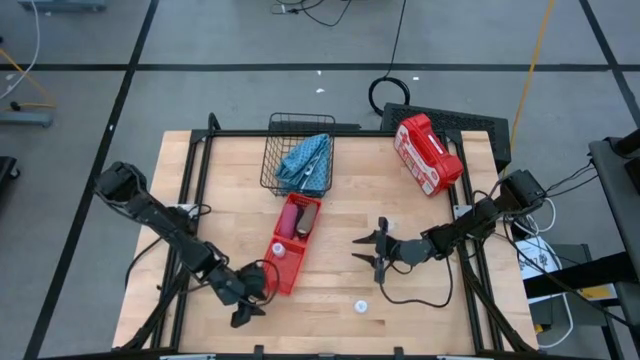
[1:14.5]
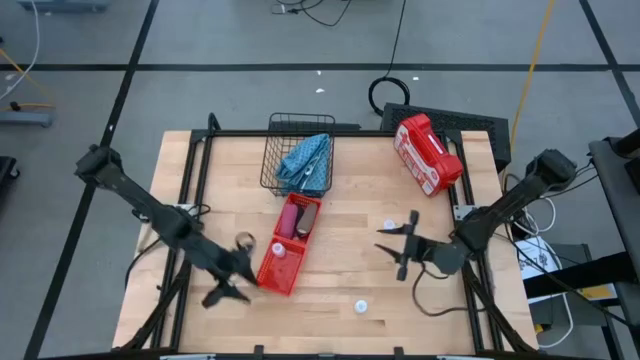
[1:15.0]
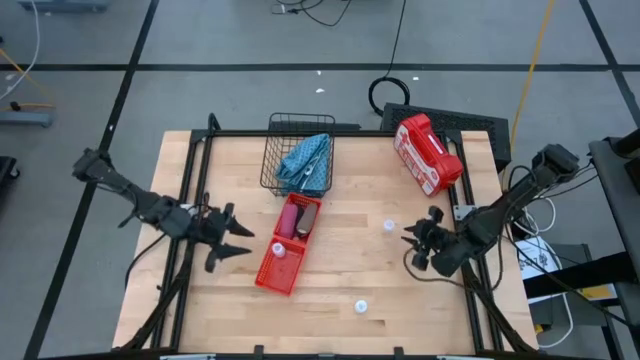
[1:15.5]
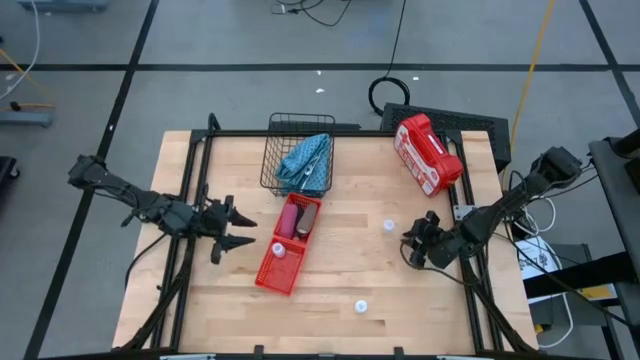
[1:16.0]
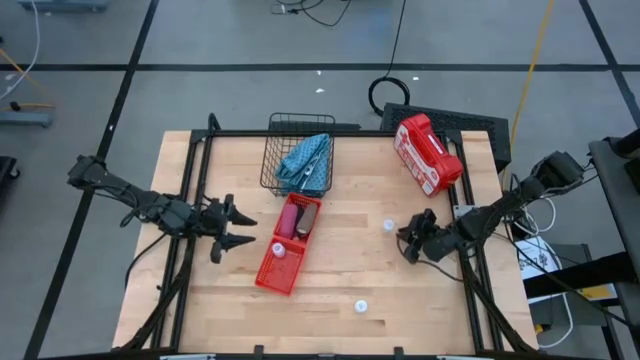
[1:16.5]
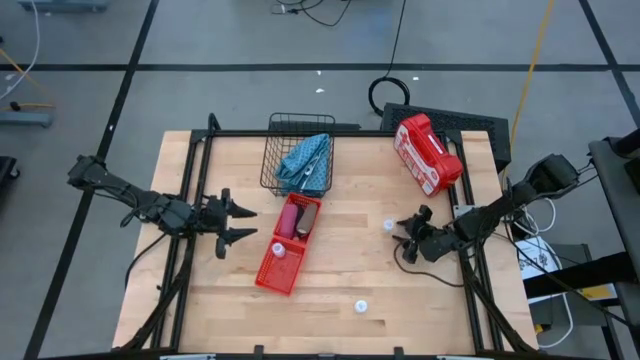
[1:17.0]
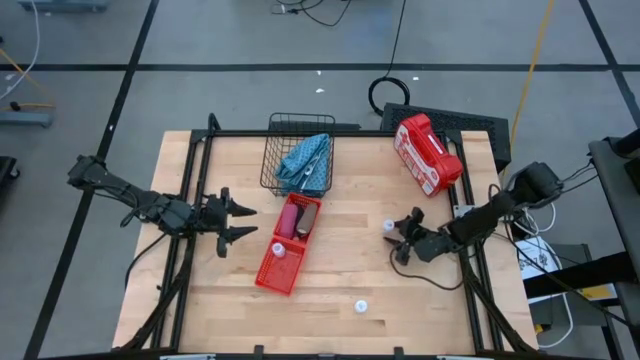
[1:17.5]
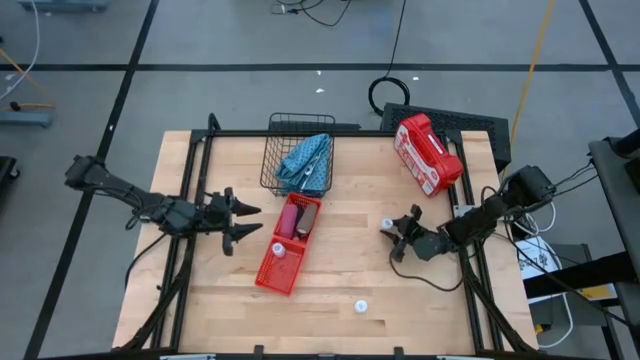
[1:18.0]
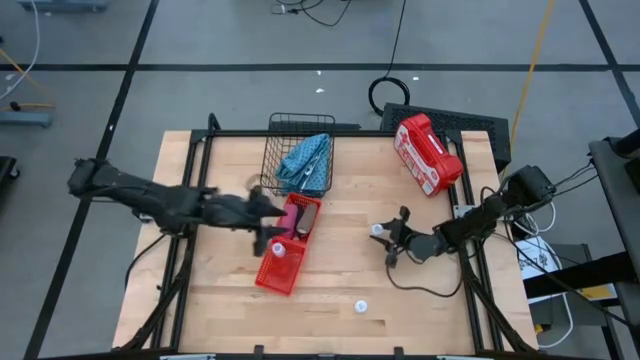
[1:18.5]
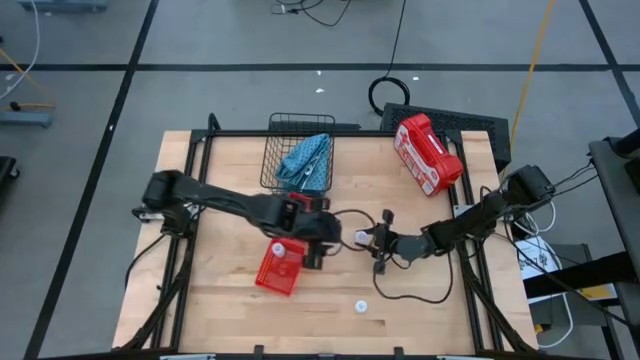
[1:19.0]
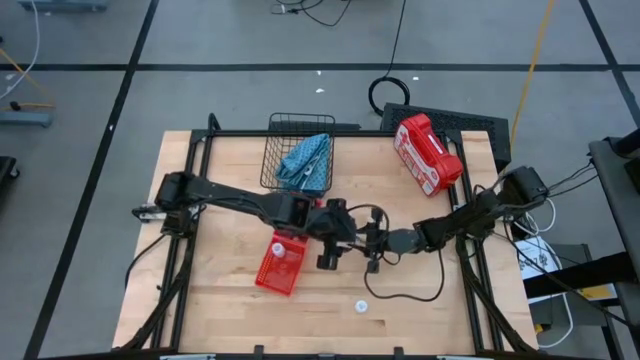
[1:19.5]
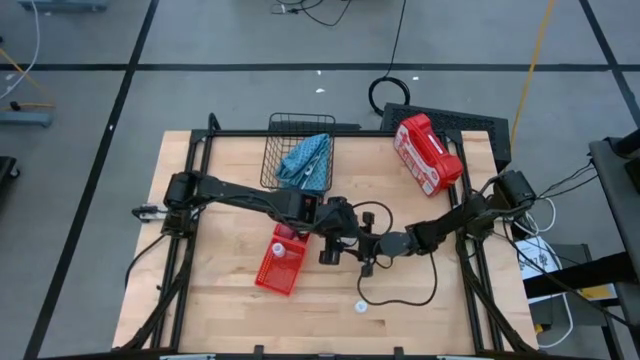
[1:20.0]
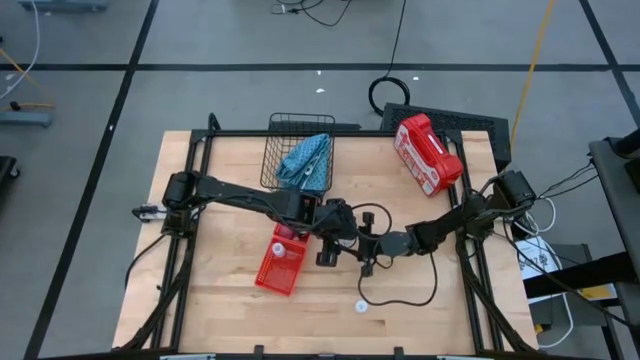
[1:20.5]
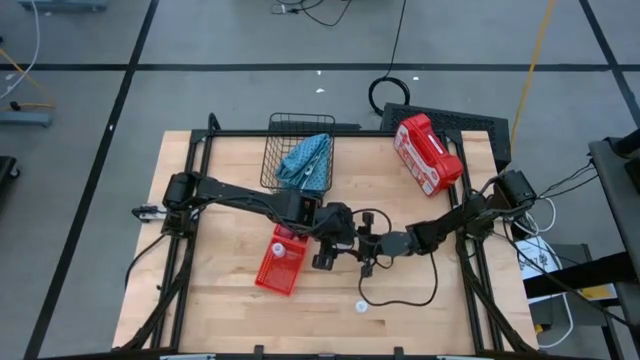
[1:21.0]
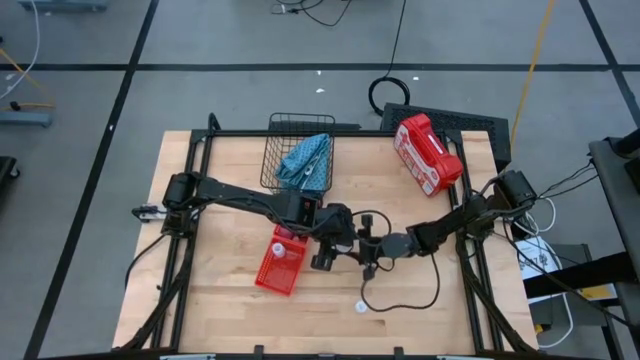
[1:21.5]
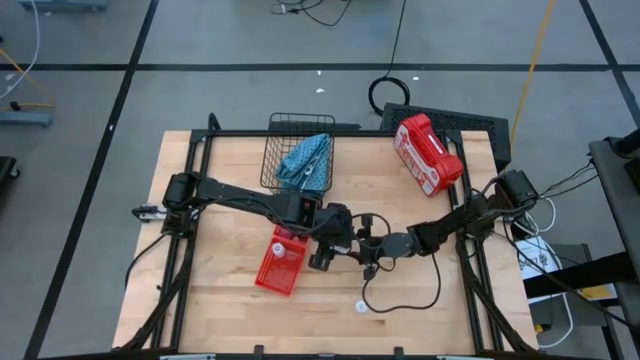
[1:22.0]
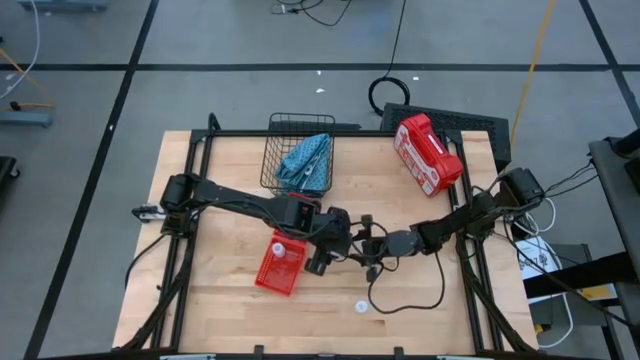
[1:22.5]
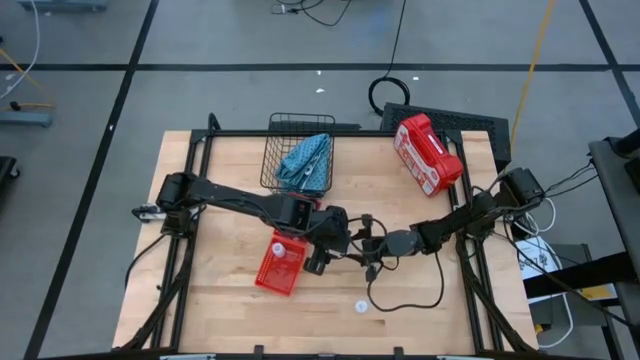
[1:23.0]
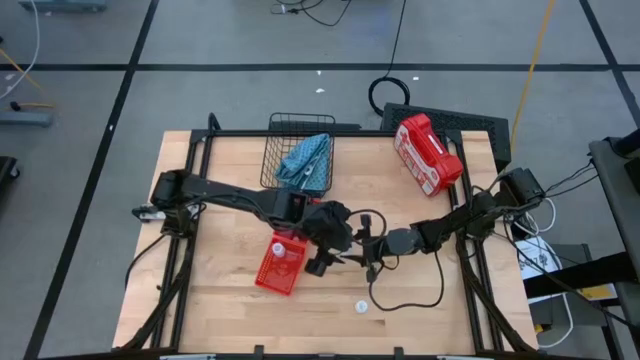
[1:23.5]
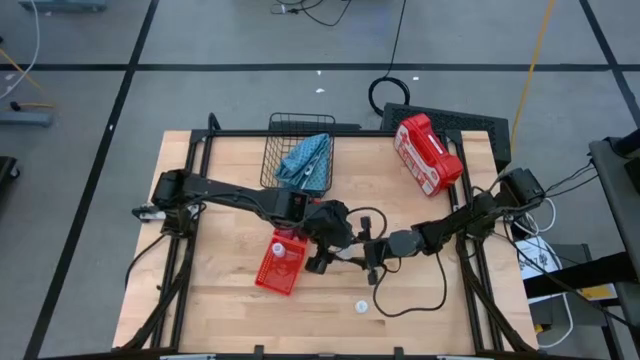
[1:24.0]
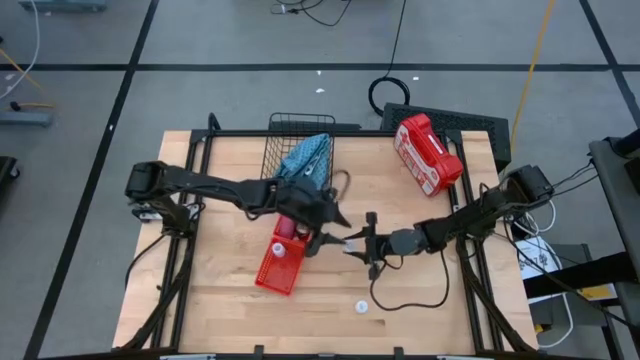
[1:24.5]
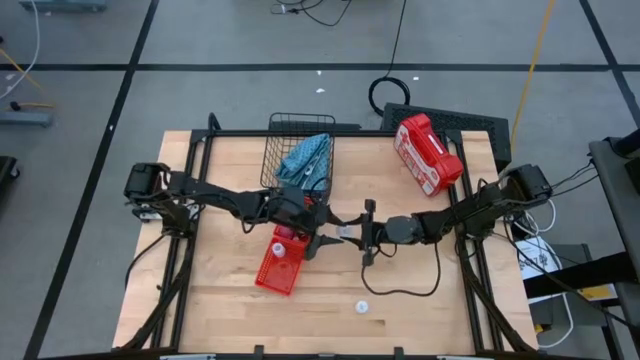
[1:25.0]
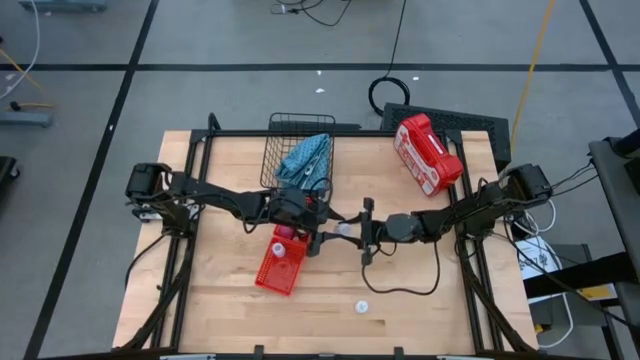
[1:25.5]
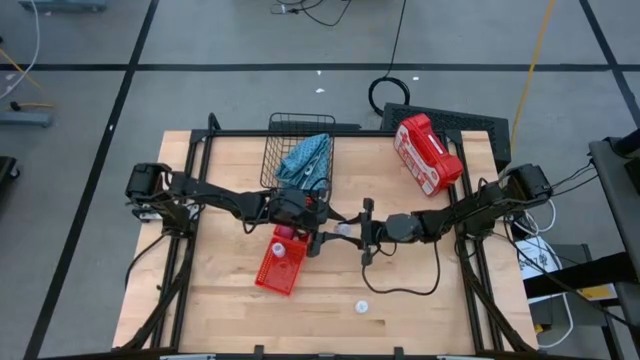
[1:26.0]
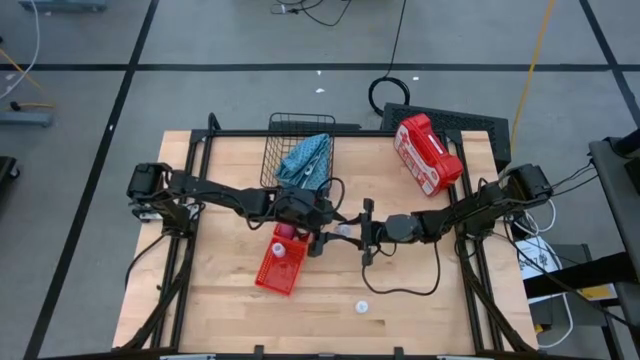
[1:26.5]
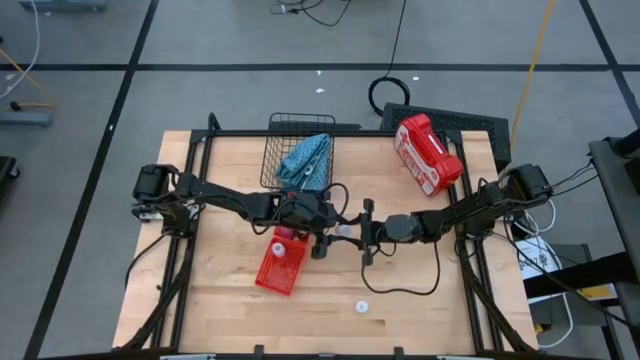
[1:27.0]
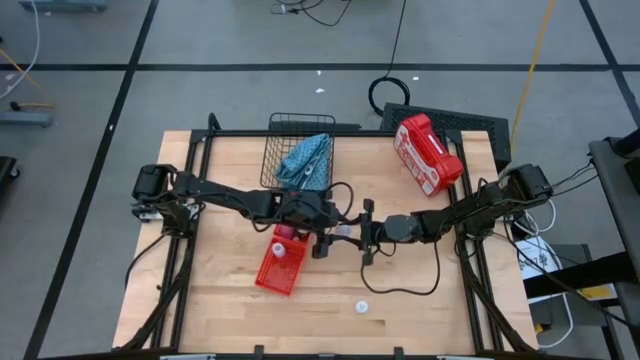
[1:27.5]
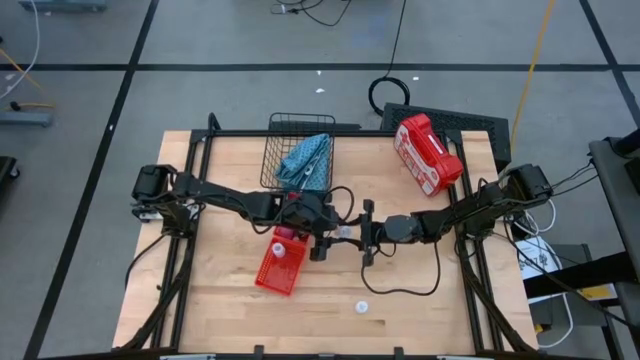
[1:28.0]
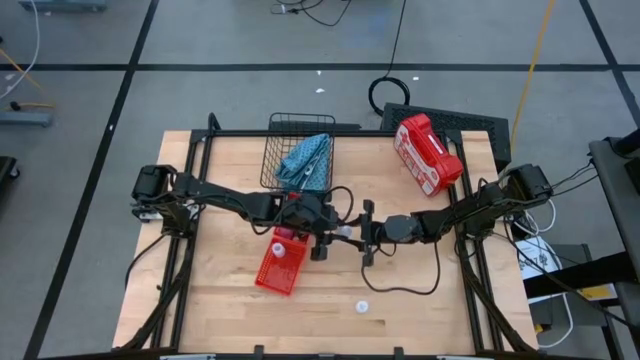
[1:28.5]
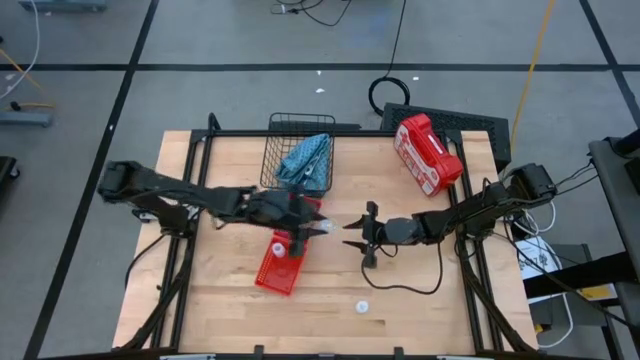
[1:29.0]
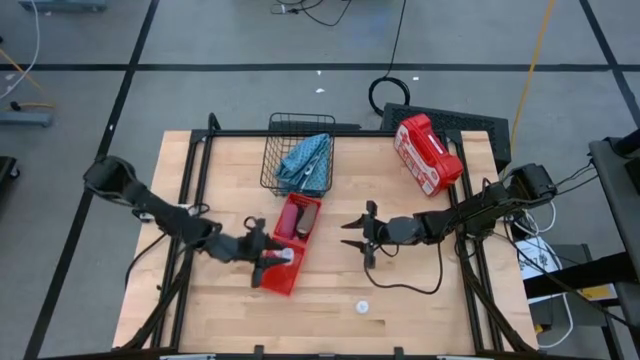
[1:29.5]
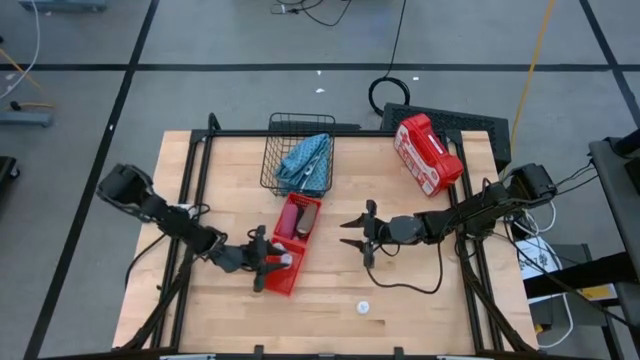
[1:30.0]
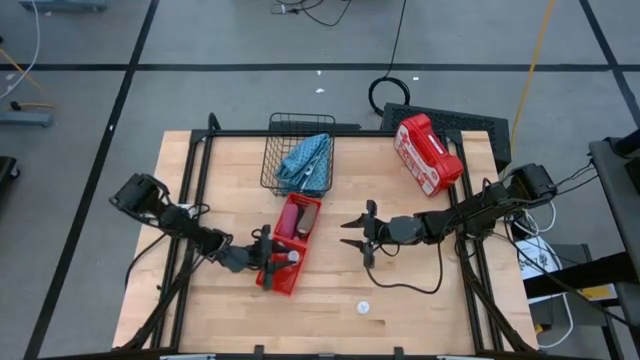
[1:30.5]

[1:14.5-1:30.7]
Task: Pick & place medical supplies in basket/bin
Put the transparent pill bottle into the bottom red bin

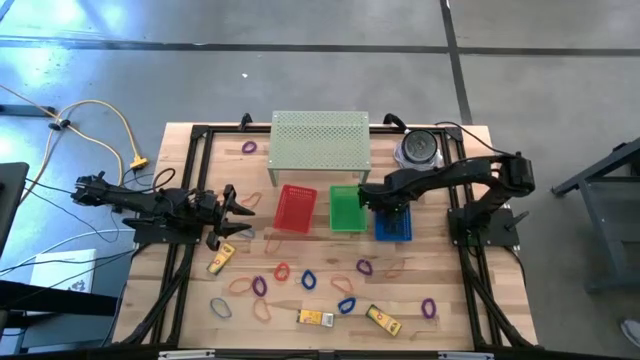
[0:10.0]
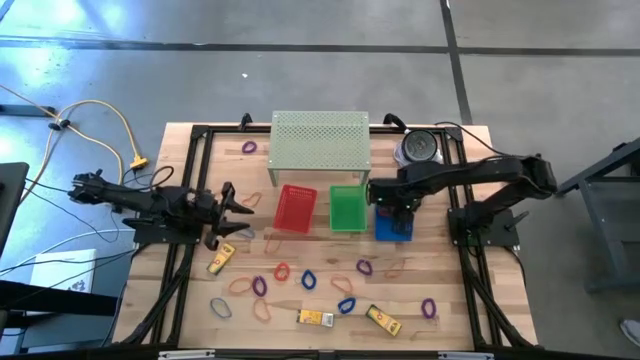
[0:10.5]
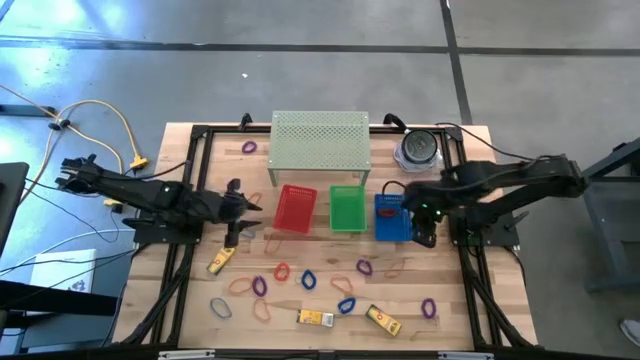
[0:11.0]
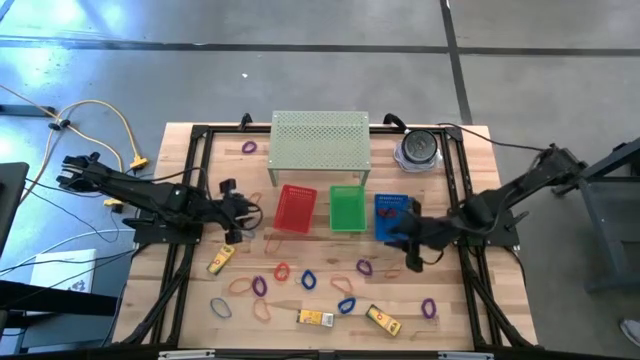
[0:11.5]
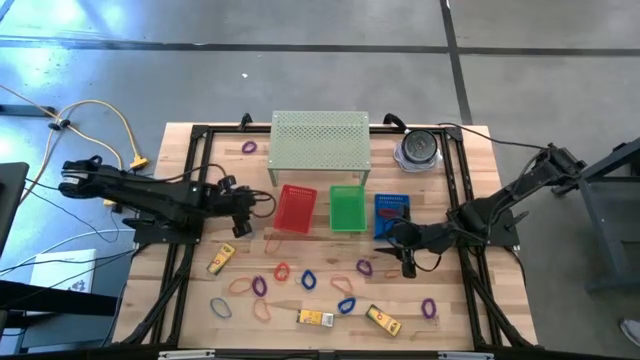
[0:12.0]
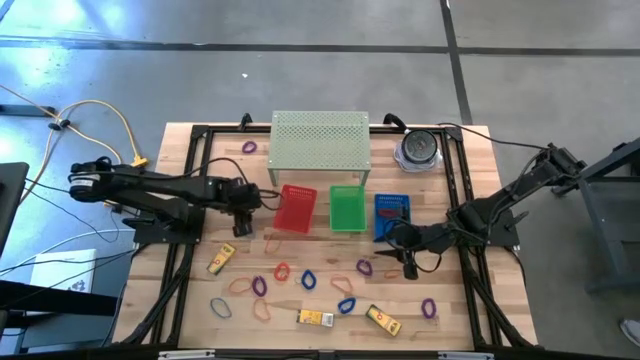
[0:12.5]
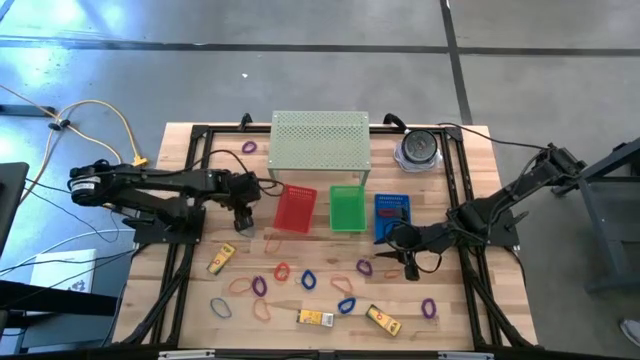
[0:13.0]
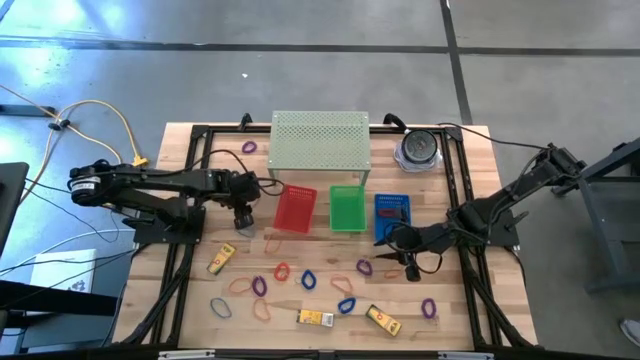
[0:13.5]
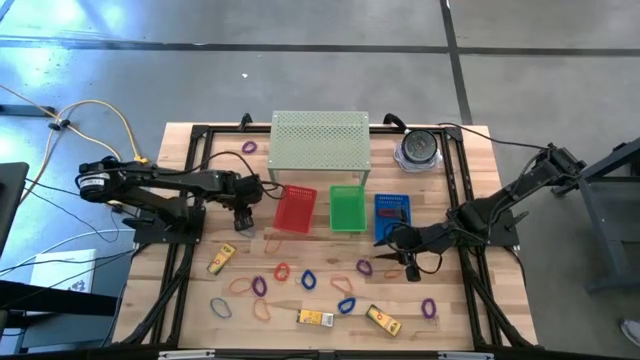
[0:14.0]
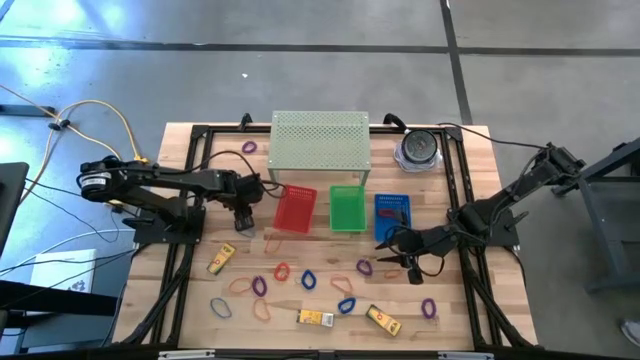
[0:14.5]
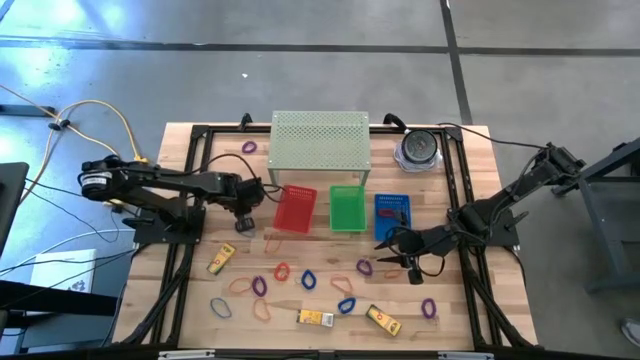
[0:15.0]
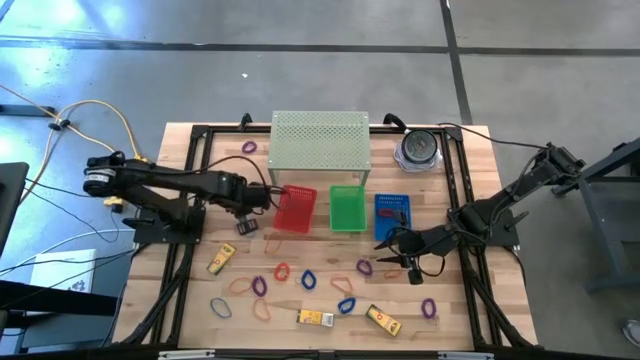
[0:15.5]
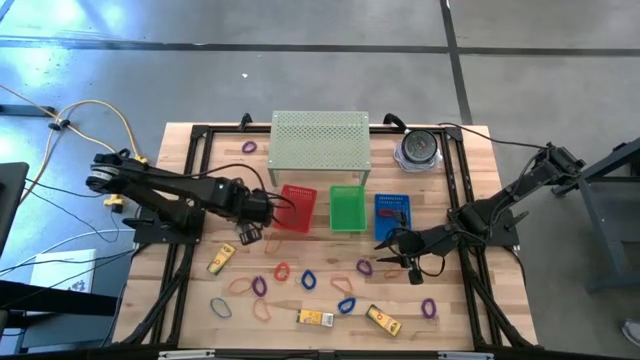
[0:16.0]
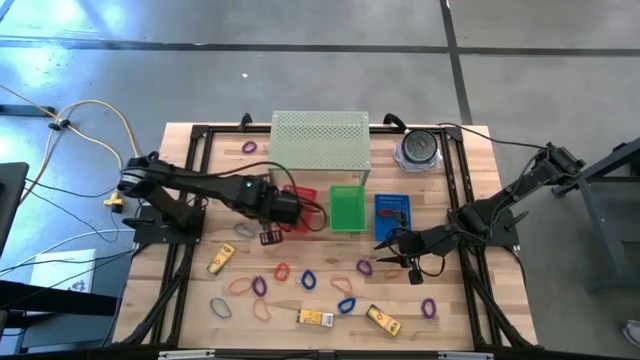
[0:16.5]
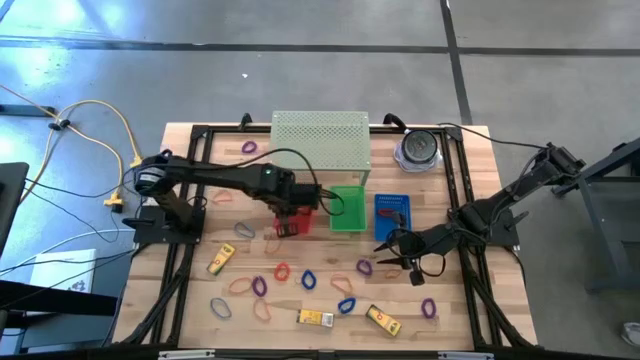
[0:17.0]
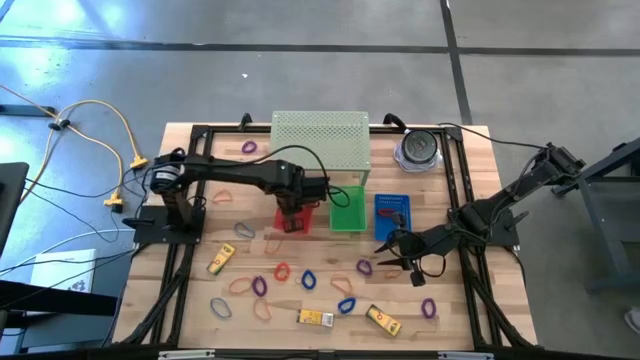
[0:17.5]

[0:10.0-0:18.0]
Task: Pick & Place Office Desk Supplies
Put the orange rubber band into the red bin
